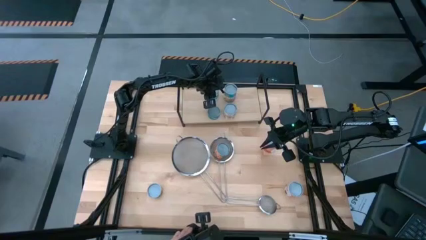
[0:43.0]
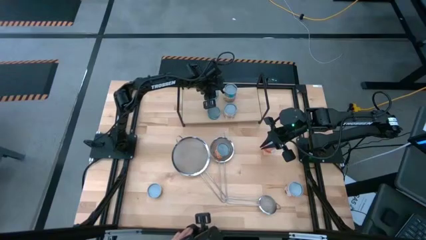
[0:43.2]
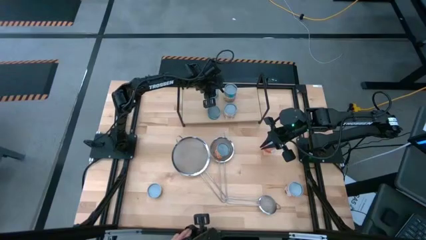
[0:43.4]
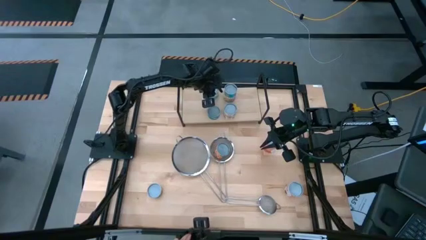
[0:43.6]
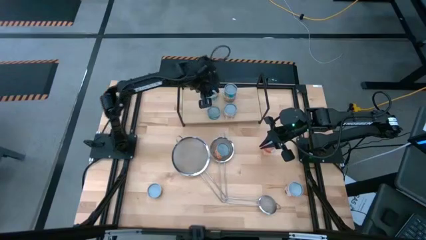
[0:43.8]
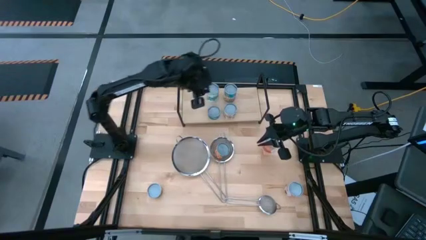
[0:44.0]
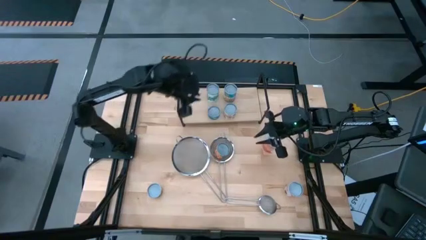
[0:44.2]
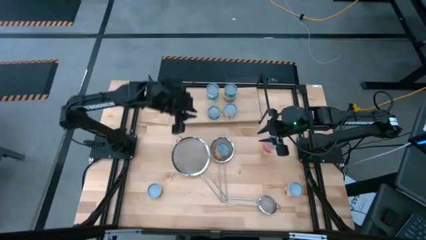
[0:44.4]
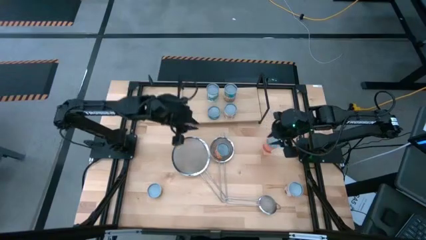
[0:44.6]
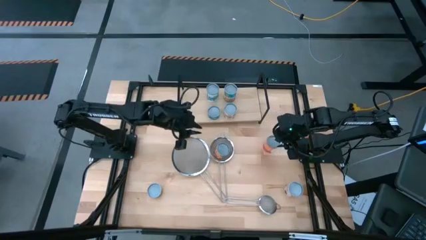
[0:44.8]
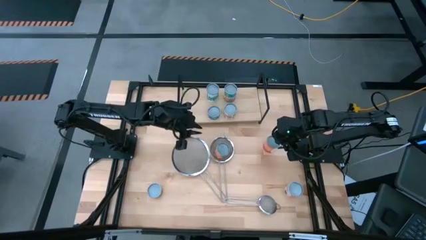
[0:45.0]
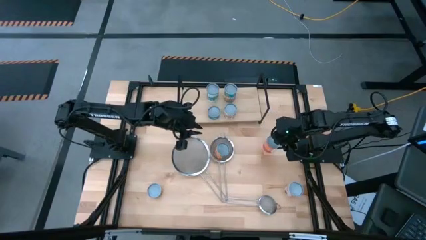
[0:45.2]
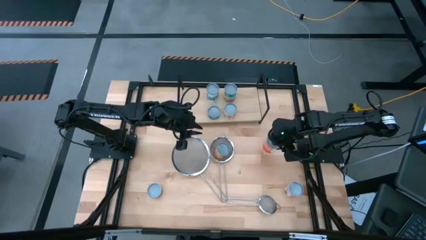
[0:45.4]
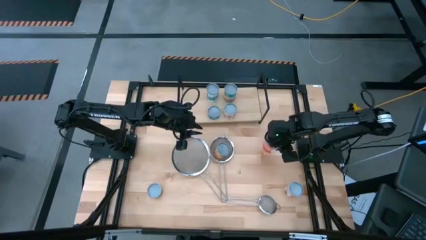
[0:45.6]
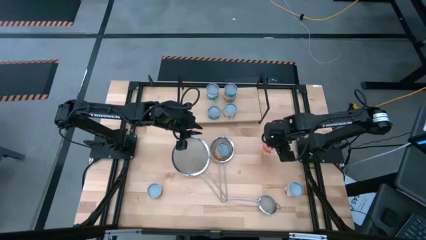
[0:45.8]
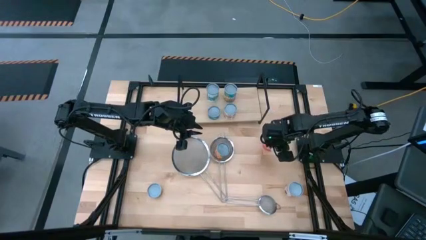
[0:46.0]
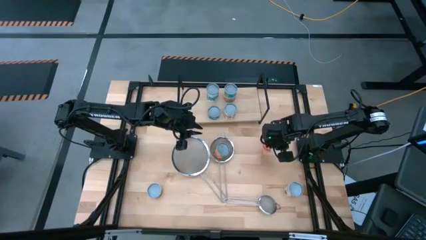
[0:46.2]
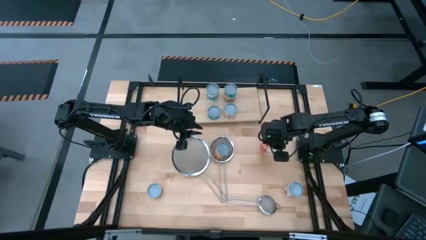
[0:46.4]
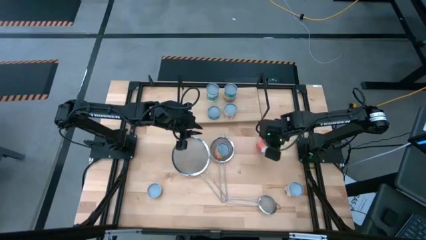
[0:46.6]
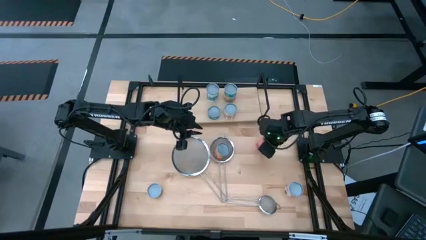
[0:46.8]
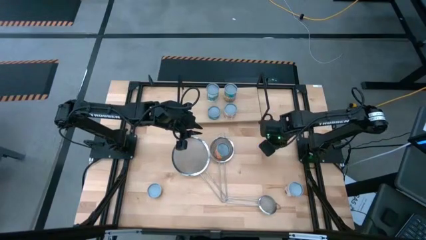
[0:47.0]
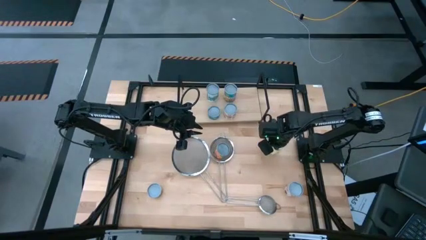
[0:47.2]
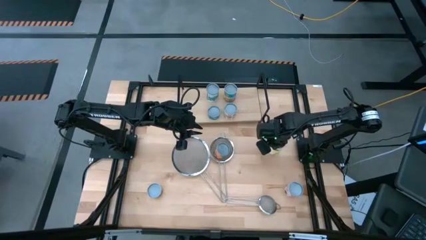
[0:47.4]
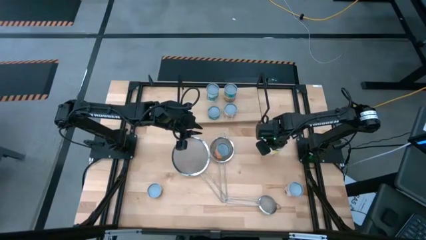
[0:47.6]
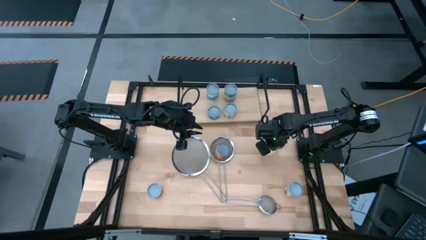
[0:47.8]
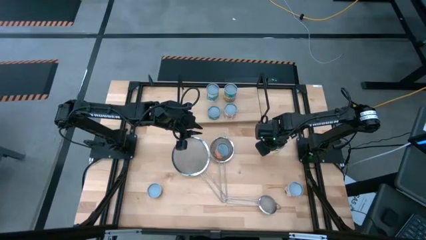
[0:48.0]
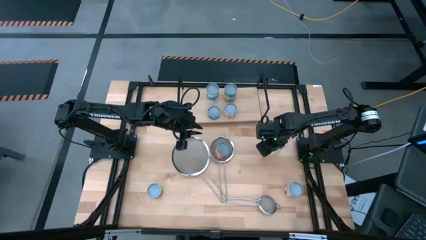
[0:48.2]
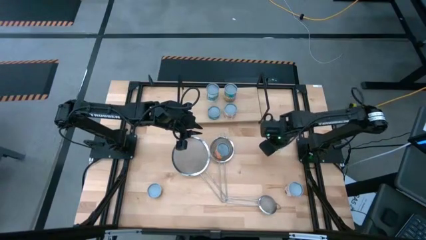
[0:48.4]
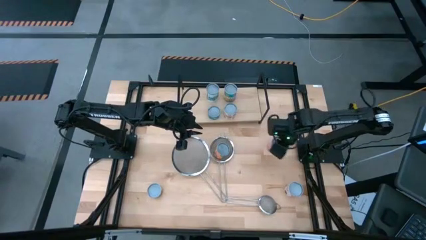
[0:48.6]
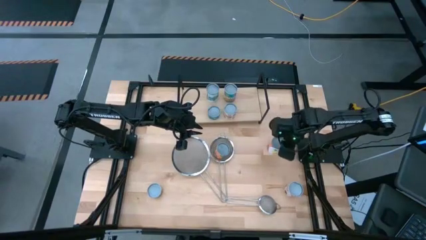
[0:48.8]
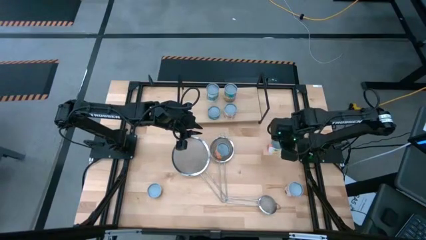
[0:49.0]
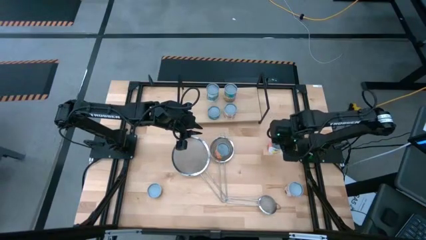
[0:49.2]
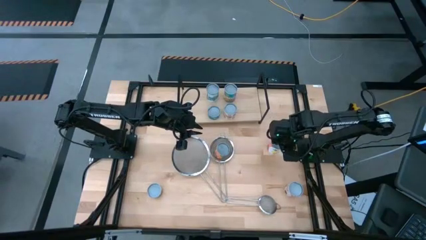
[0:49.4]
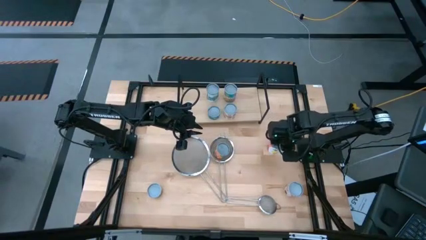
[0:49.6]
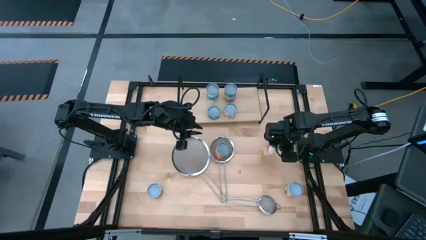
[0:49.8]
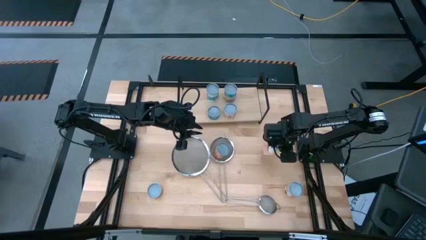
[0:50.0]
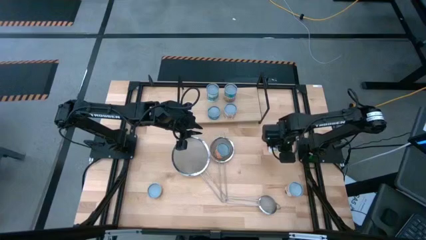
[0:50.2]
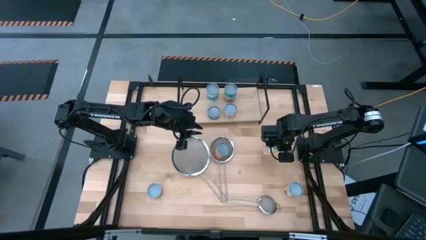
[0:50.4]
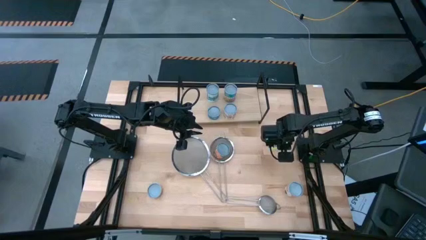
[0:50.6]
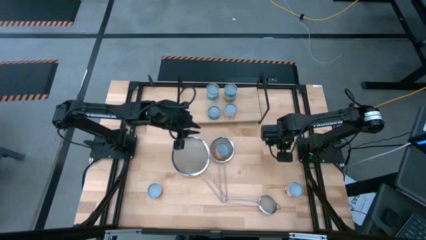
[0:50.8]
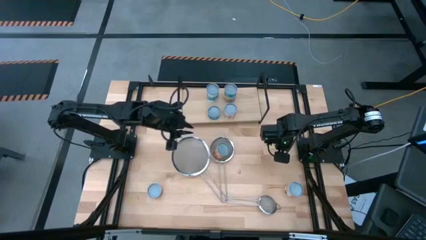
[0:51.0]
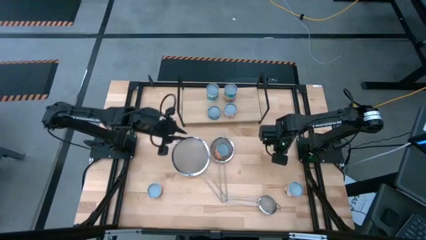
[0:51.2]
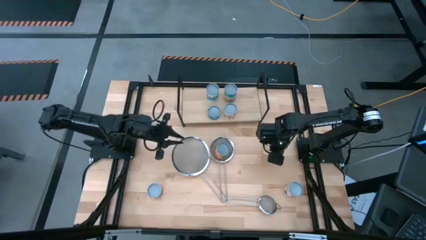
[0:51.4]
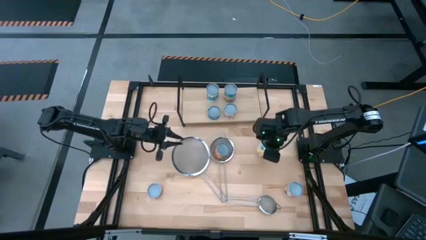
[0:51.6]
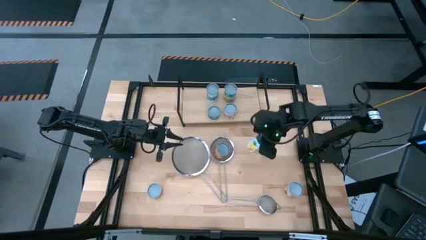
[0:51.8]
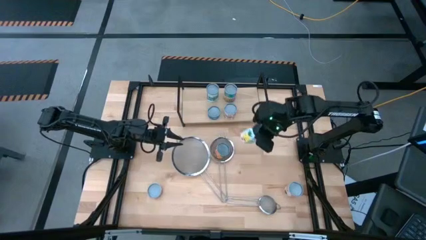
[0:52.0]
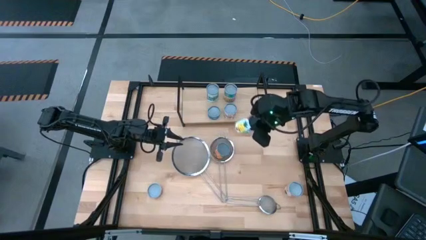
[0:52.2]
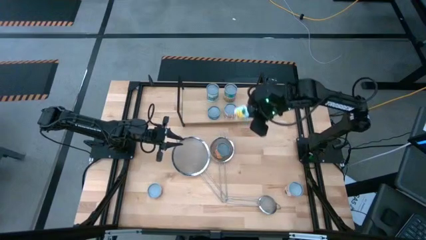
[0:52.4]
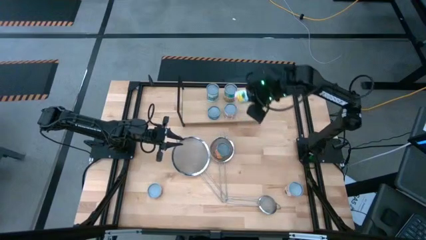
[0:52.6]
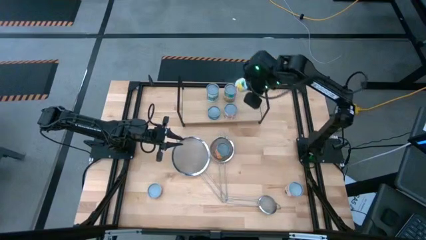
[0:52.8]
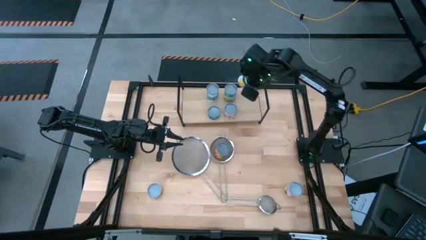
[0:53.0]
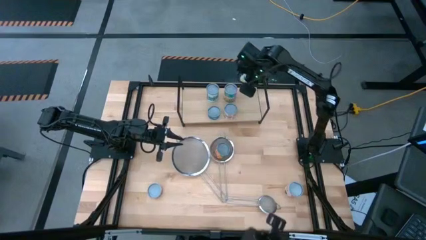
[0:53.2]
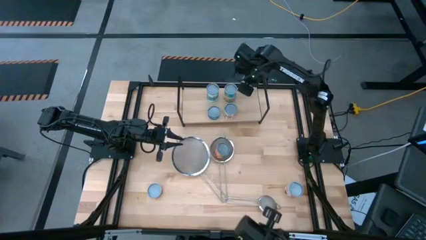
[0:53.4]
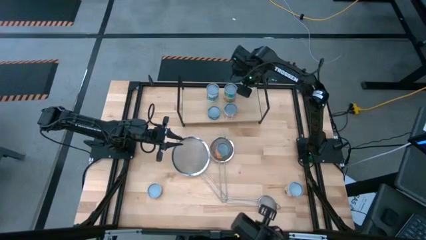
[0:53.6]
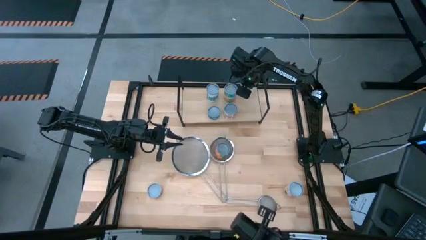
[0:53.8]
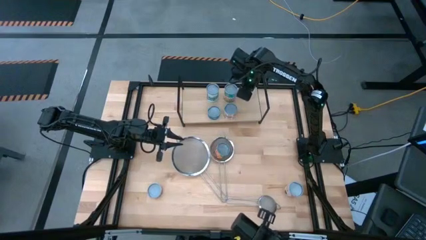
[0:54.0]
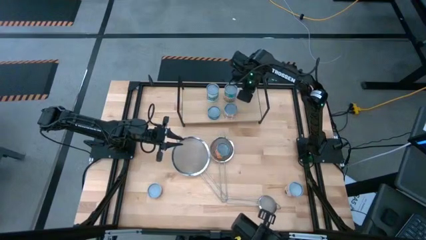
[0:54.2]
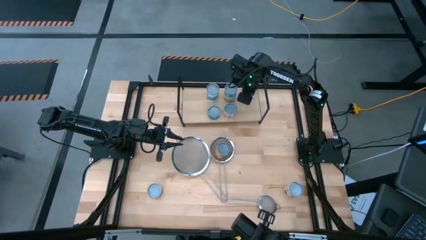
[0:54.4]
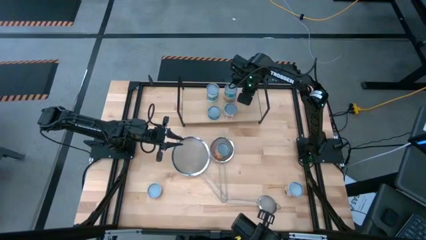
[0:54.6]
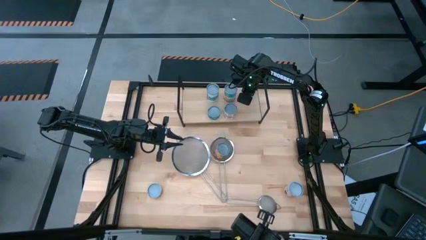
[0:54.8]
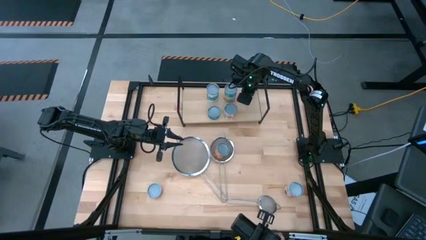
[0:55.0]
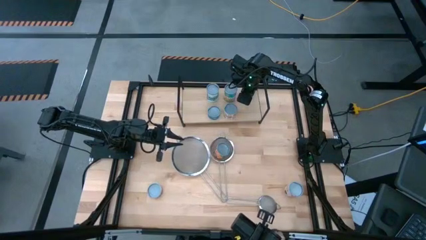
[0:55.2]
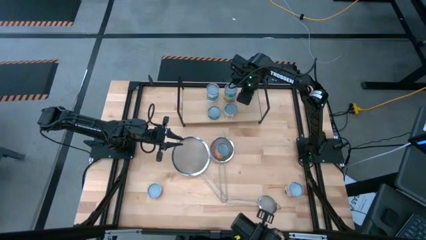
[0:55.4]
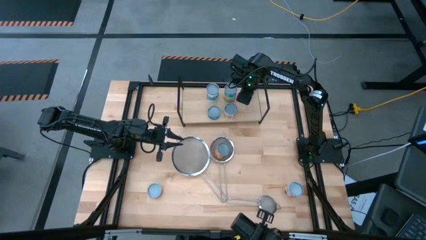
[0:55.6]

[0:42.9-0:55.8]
Task: Pick and place cans onto a shelf
Put the canned mixed fruits on the shelf

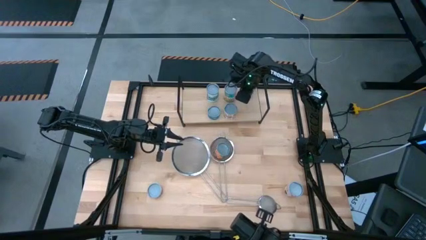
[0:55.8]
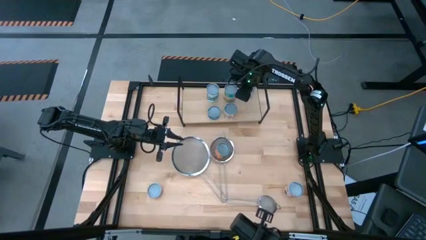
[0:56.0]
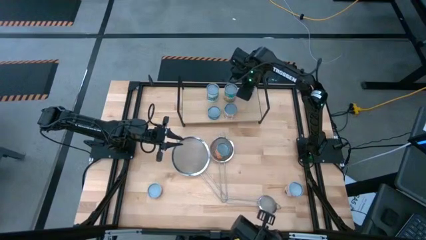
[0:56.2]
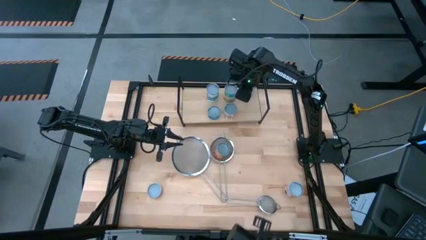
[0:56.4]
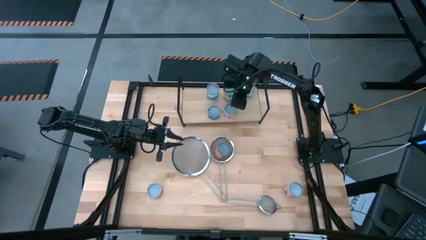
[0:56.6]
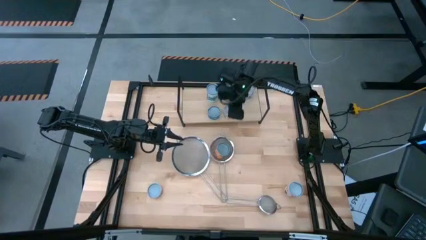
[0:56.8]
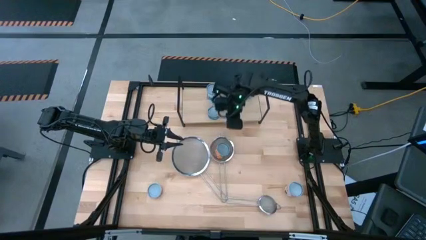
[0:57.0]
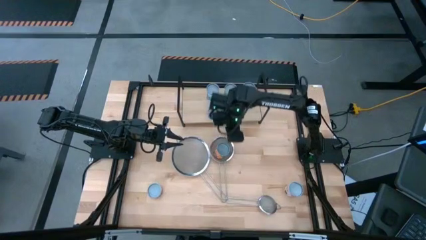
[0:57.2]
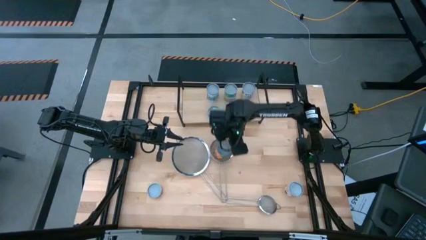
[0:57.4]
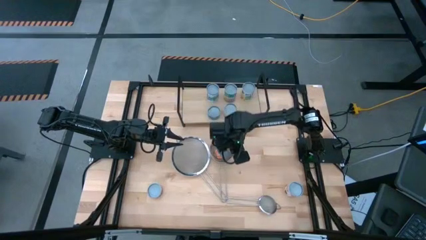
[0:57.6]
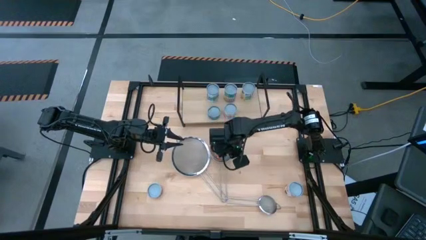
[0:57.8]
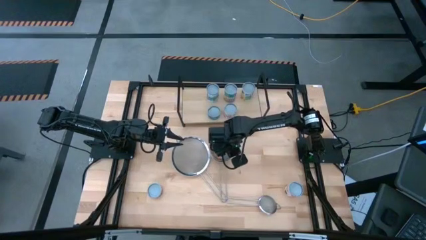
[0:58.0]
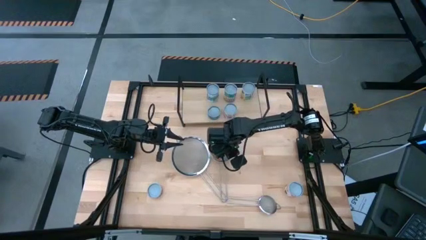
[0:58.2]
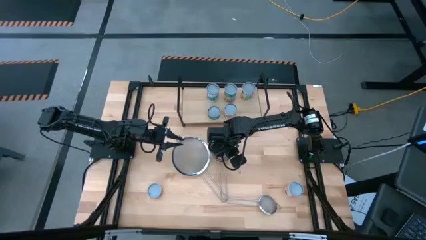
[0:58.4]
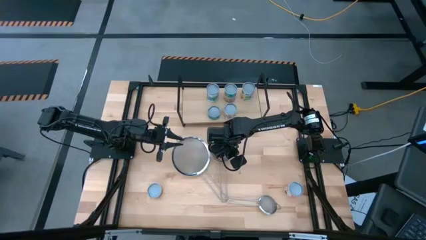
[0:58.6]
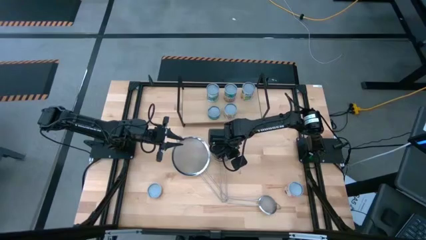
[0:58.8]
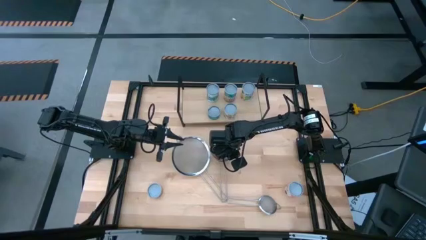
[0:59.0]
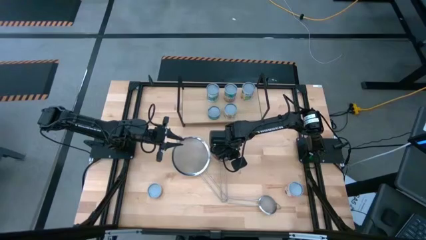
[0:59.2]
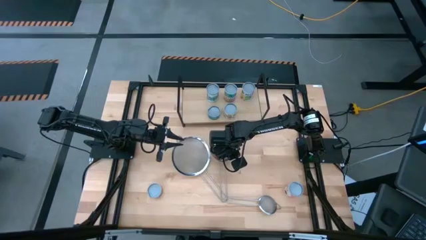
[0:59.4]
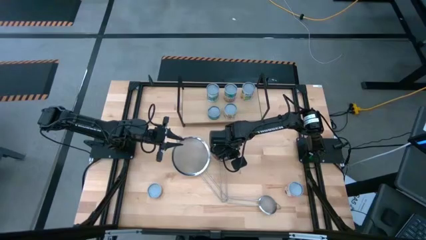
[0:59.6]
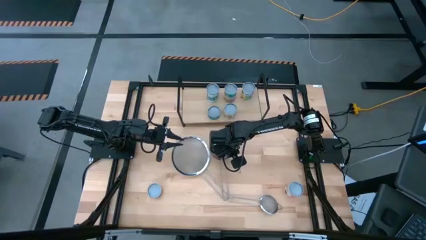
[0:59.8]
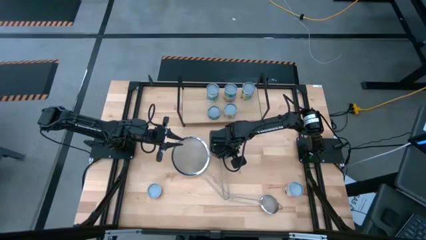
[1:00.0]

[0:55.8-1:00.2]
Put the canned oranges on the shelf
